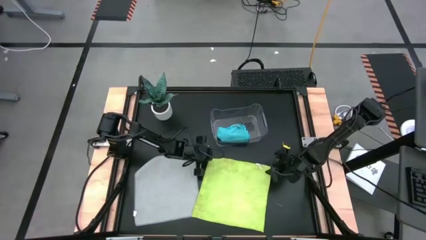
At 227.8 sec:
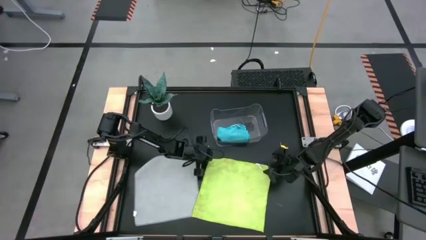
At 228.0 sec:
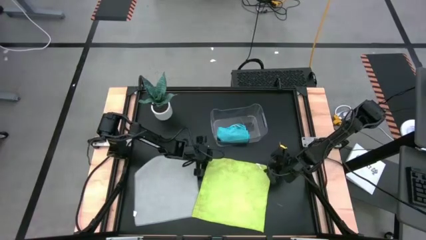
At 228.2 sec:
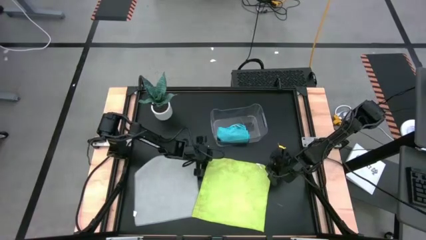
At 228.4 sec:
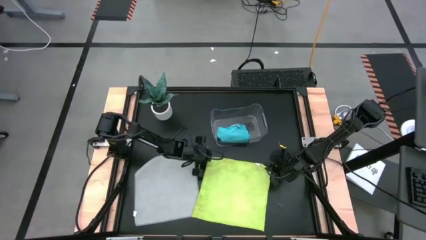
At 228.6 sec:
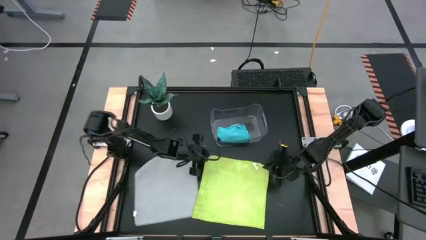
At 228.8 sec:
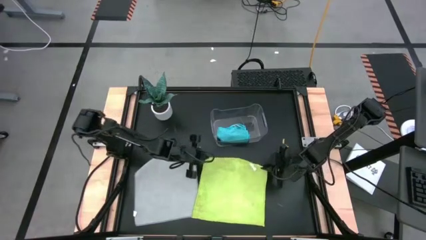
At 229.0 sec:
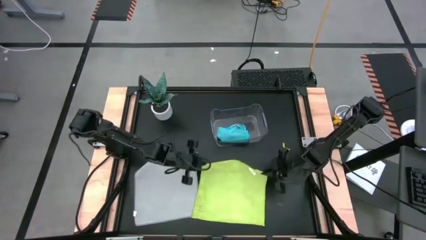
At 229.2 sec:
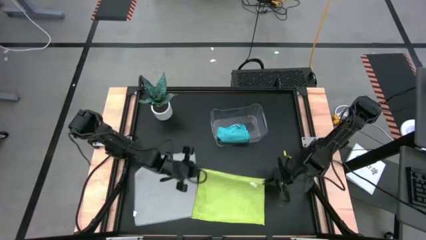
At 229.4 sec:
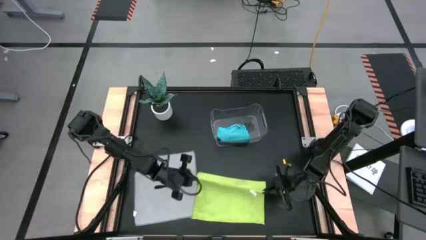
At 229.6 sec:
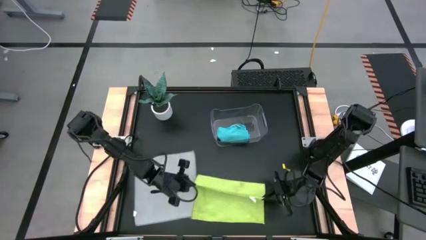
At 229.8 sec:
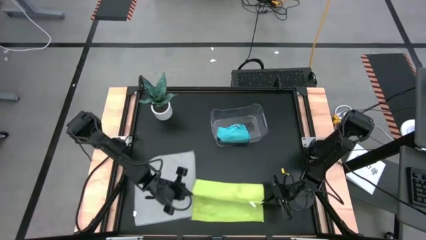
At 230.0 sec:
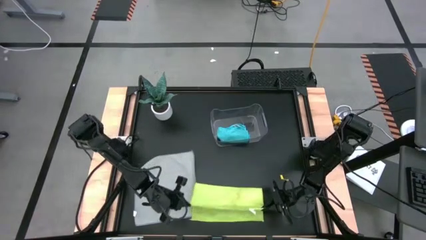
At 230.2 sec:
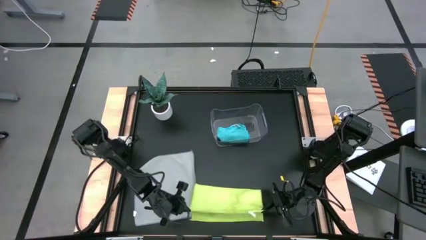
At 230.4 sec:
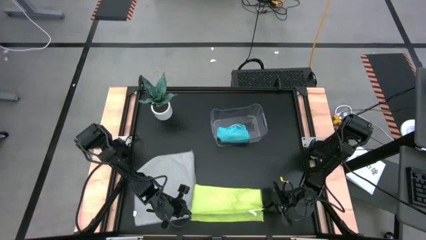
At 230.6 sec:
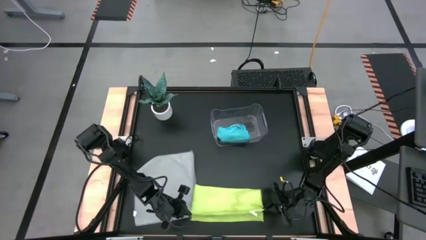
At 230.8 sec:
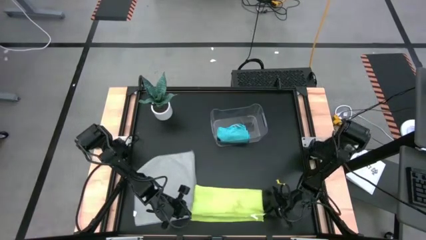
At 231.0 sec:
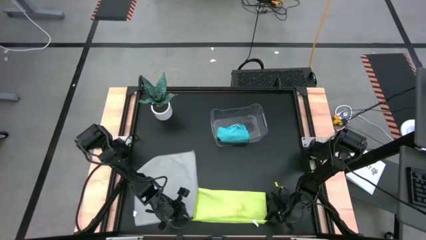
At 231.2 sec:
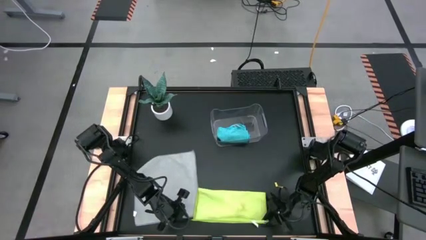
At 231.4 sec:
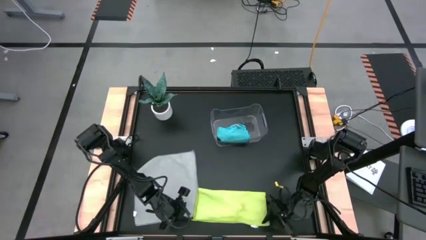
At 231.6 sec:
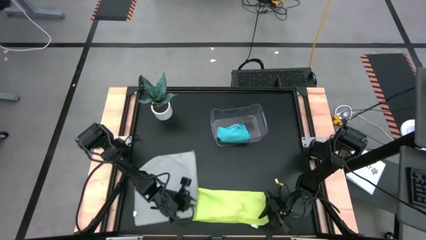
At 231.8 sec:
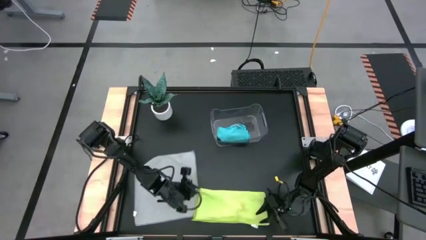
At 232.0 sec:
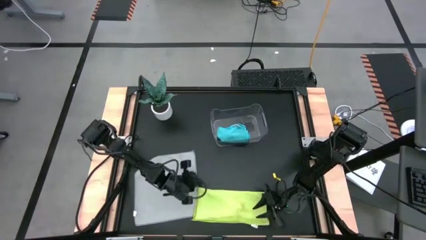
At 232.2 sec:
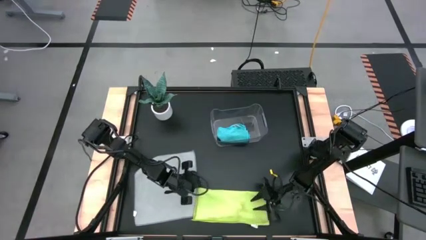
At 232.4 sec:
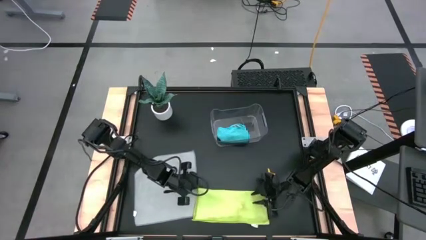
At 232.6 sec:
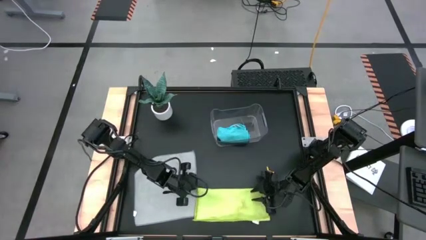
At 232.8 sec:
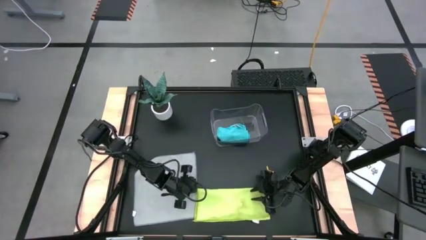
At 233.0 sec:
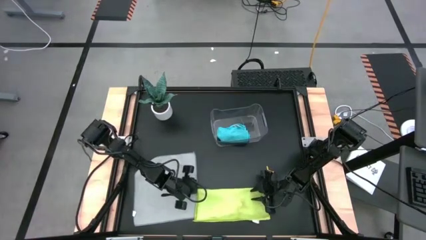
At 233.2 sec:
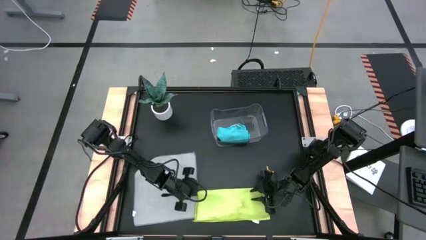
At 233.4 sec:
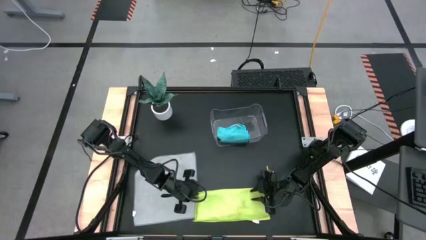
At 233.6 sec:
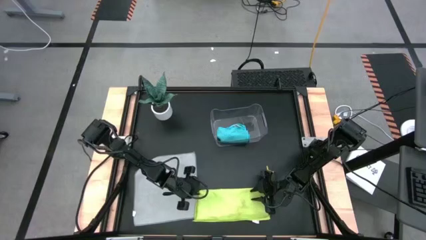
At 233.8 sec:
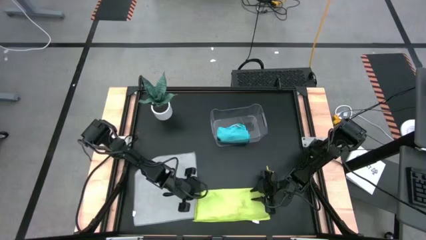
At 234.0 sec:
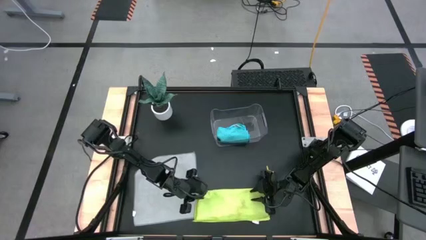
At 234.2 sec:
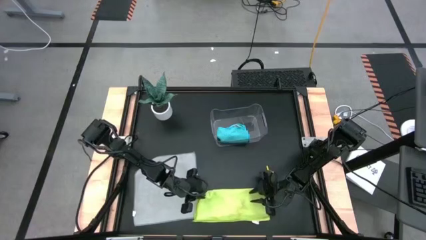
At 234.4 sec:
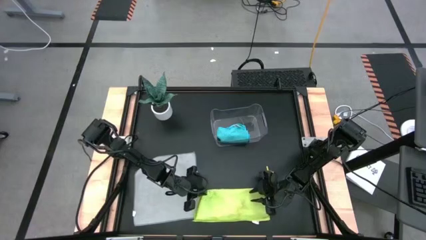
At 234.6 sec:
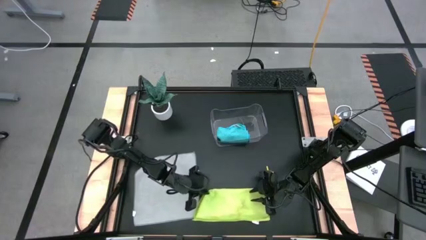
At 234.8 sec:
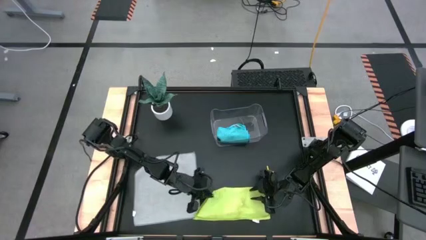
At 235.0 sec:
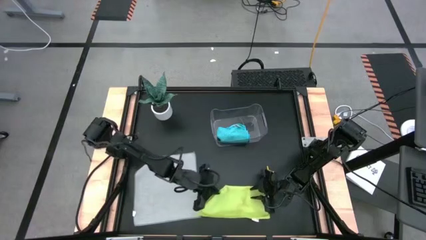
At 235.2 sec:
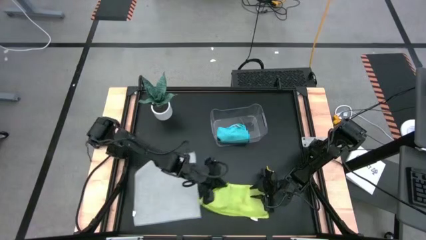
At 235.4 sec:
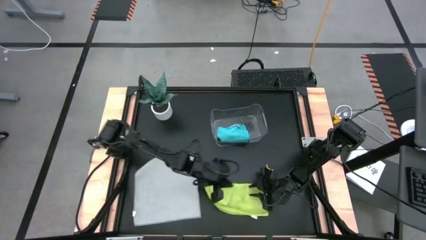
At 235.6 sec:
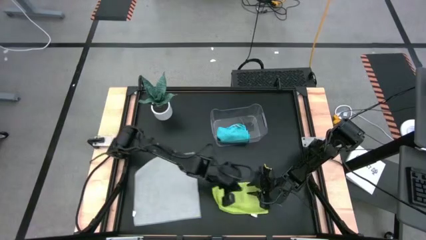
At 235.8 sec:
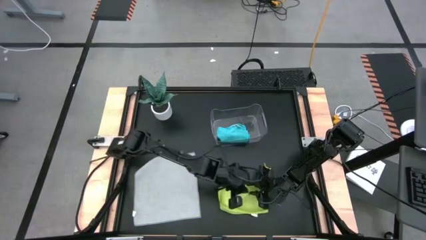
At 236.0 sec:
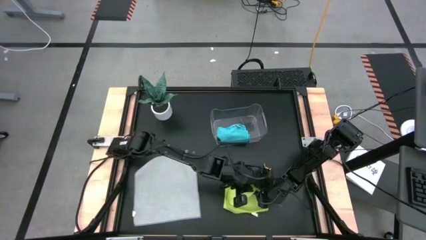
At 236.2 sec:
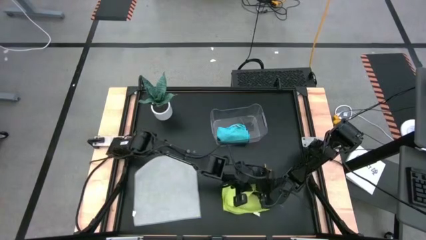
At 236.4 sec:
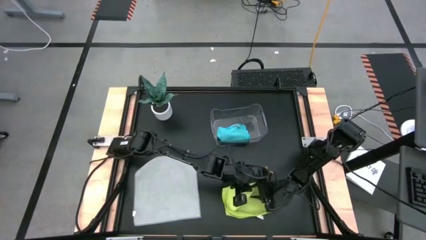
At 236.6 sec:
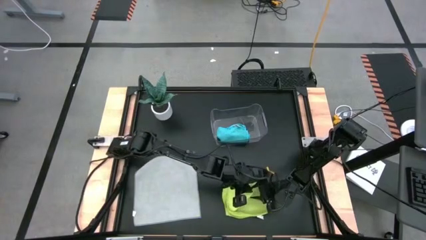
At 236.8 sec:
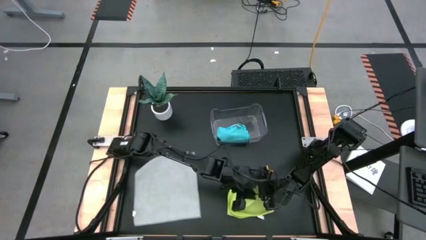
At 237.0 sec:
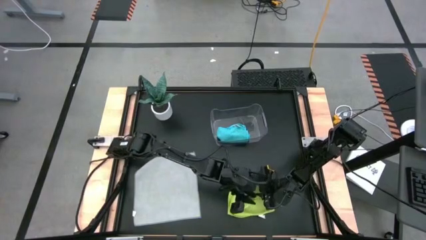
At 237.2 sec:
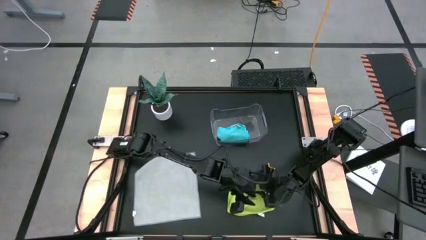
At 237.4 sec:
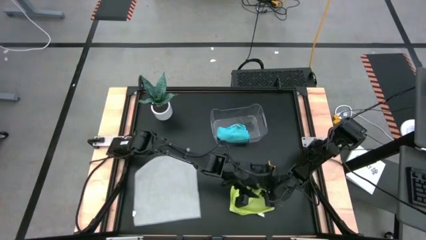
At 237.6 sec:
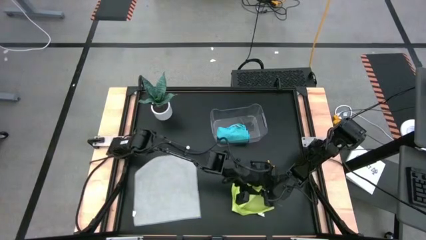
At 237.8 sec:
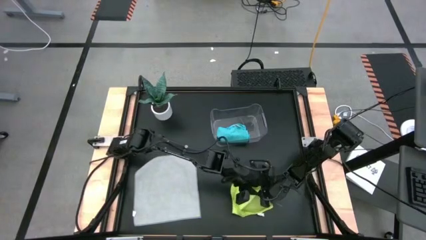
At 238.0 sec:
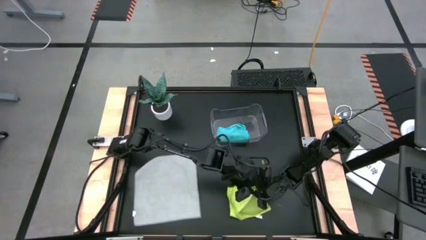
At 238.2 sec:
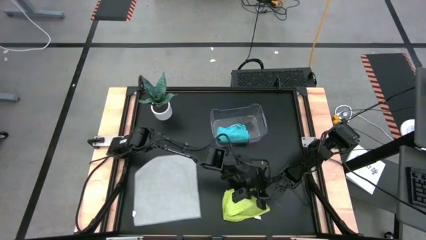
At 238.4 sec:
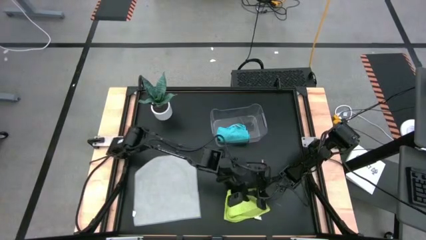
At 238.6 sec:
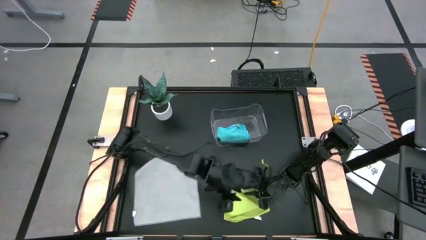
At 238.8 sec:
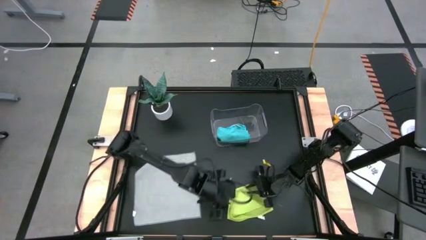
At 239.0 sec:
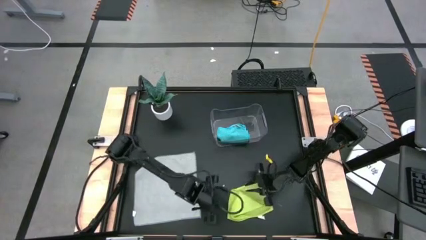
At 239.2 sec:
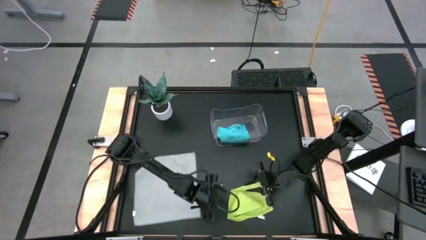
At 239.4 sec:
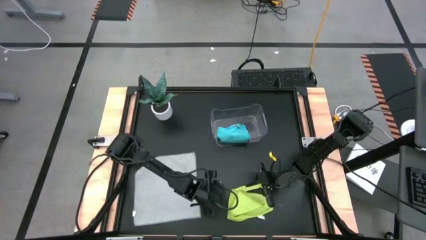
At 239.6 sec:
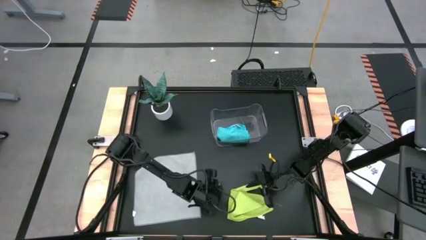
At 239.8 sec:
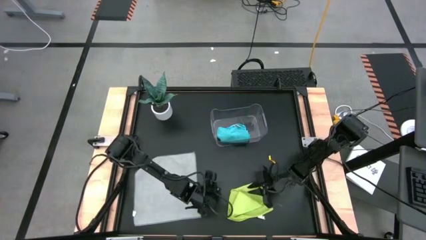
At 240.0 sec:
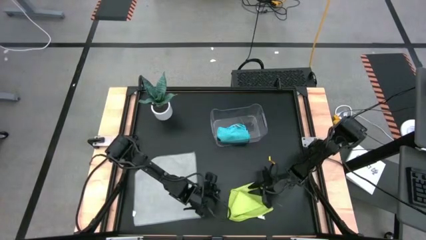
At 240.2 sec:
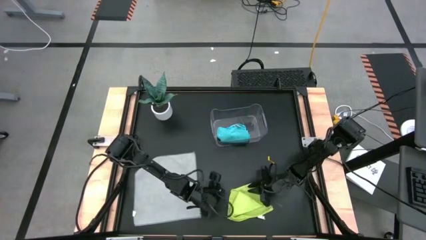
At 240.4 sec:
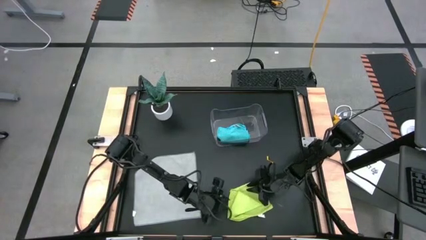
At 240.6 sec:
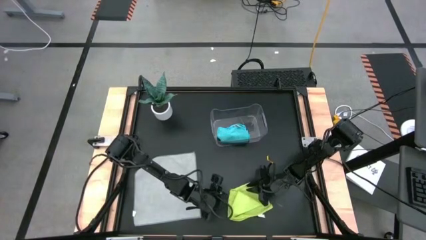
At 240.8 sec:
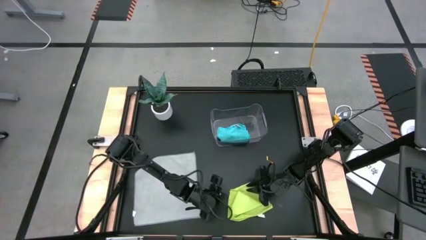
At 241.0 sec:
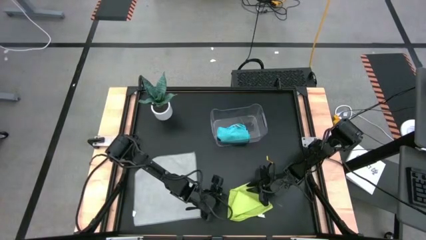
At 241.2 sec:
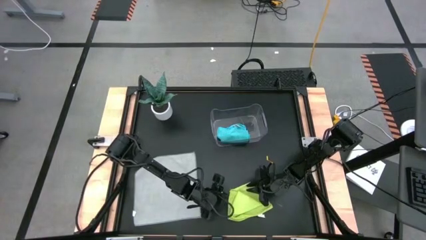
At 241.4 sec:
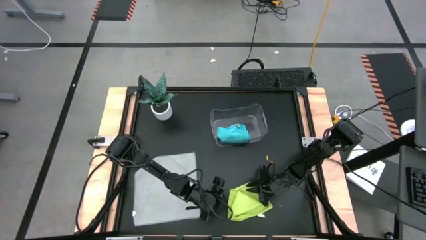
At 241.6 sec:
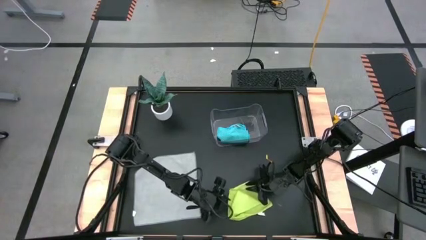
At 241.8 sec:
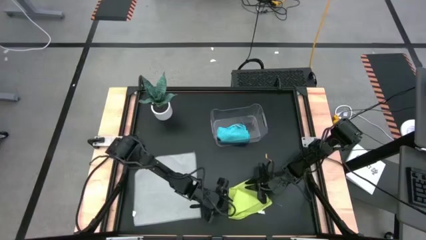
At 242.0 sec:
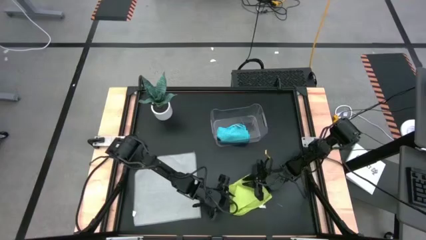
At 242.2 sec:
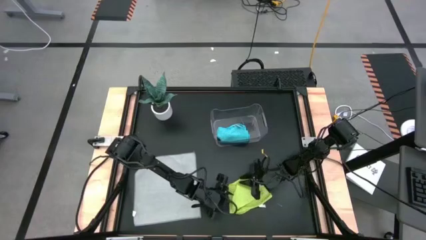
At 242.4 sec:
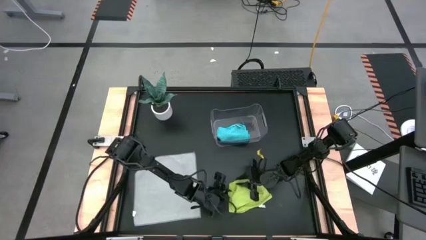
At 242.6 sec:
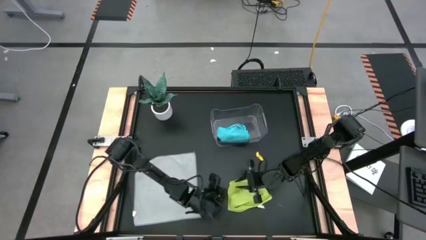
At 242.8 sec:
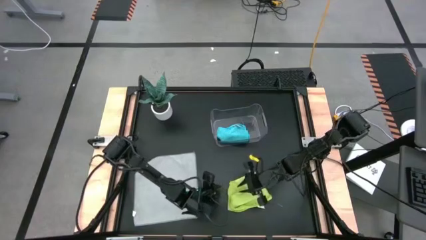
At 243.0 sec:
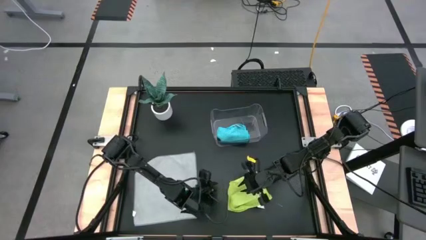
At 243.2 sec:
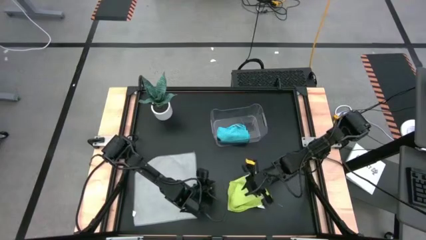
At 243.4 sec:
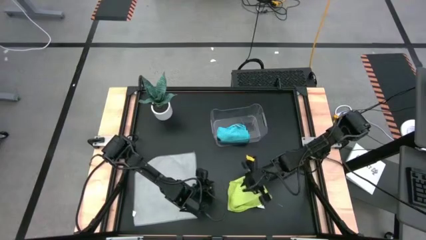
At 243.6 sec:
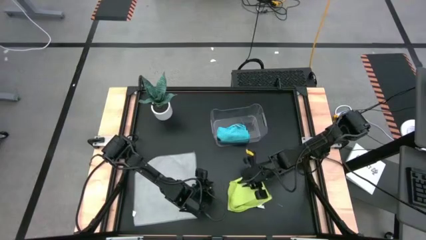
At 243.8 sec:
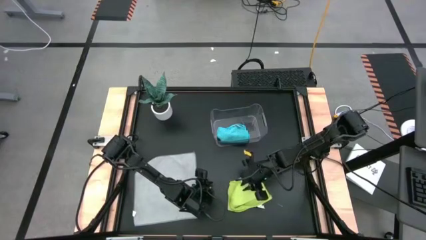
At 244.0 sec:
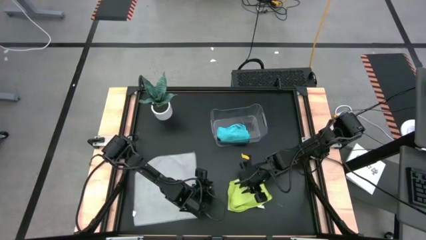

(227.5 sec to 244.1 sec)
Task: Fold microfiber towels
Fold the green towel
